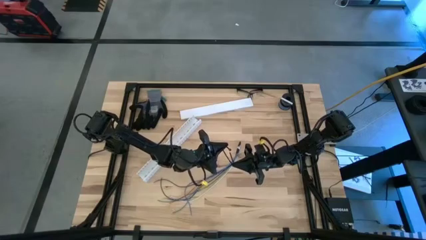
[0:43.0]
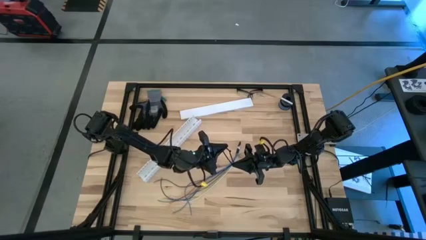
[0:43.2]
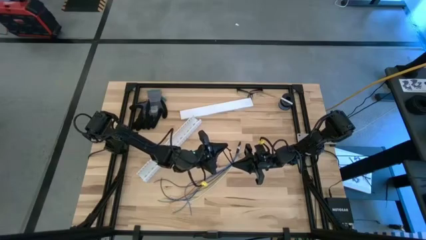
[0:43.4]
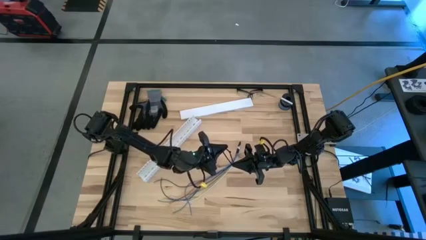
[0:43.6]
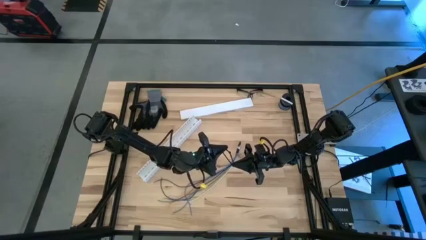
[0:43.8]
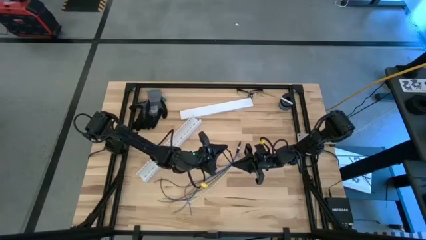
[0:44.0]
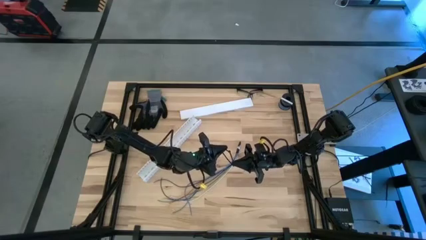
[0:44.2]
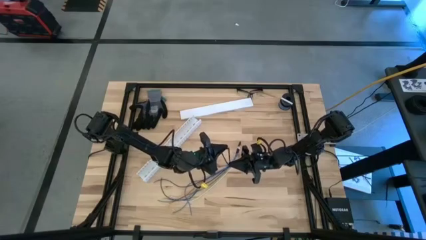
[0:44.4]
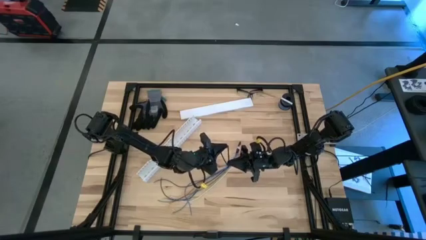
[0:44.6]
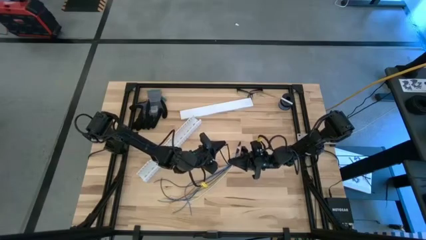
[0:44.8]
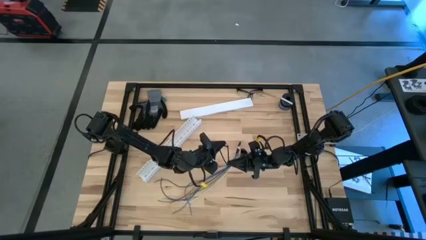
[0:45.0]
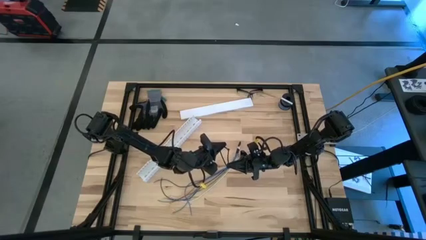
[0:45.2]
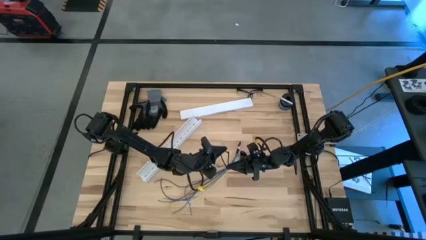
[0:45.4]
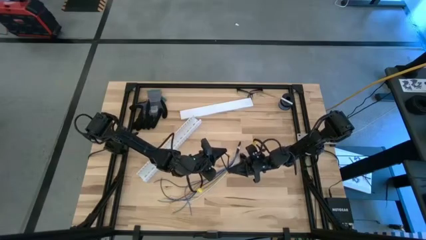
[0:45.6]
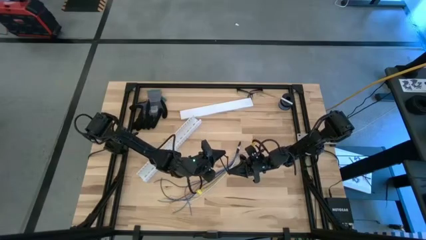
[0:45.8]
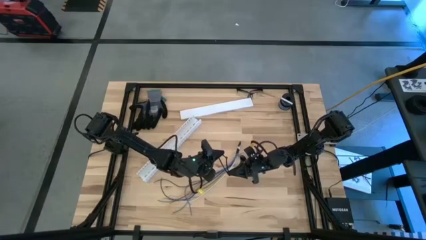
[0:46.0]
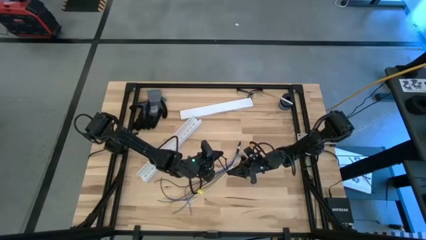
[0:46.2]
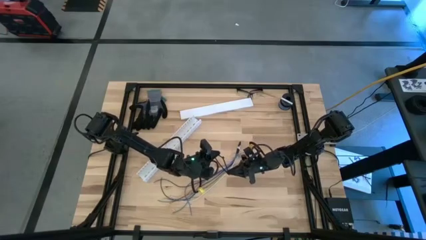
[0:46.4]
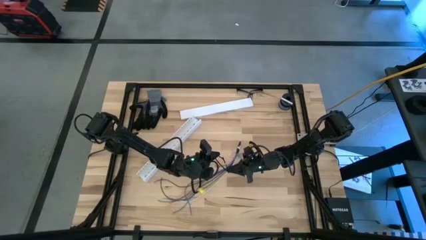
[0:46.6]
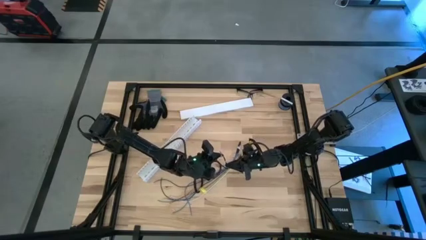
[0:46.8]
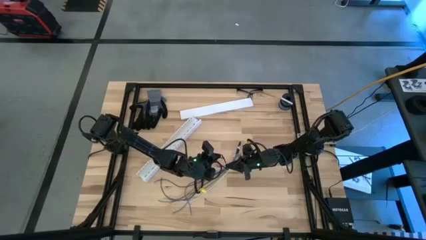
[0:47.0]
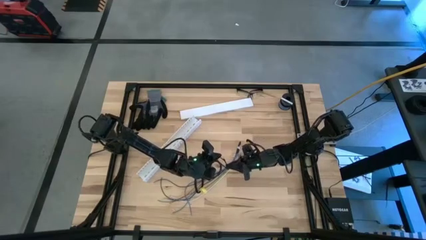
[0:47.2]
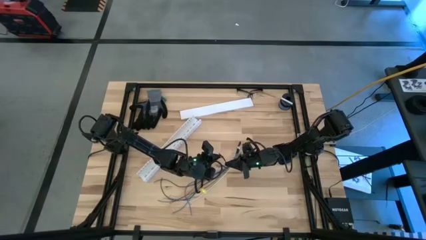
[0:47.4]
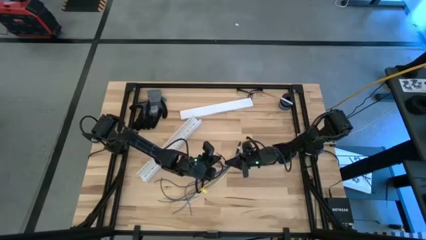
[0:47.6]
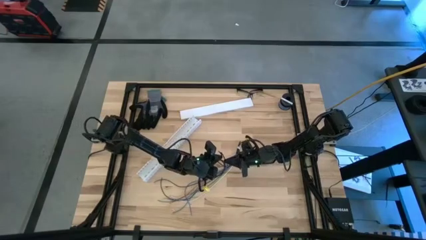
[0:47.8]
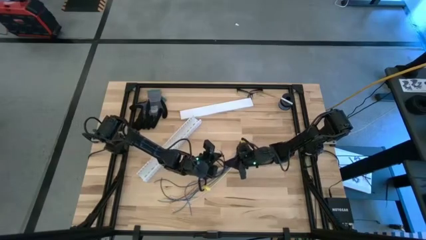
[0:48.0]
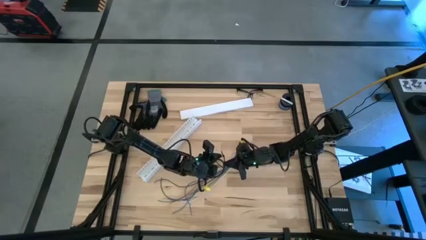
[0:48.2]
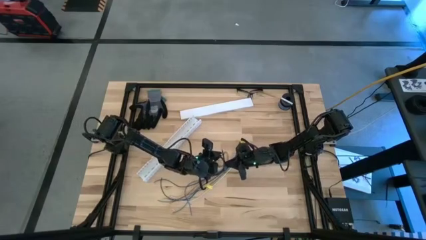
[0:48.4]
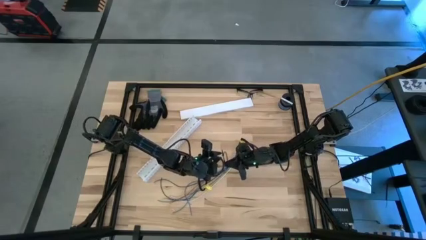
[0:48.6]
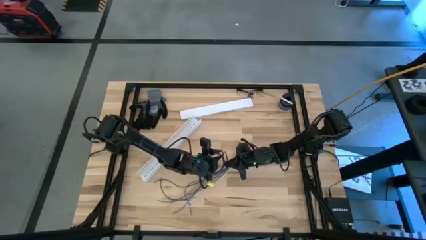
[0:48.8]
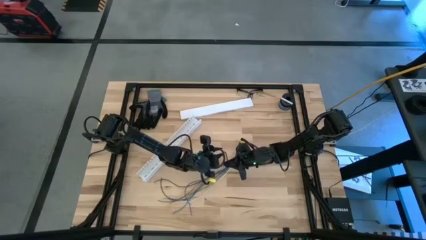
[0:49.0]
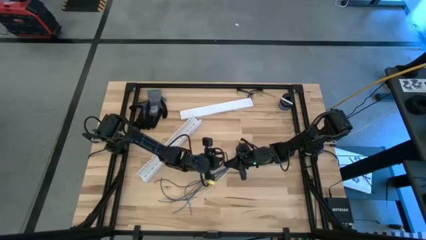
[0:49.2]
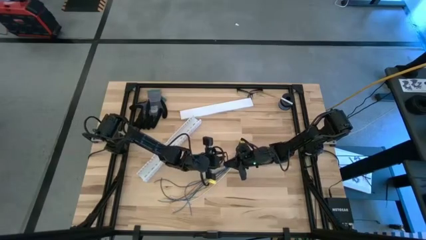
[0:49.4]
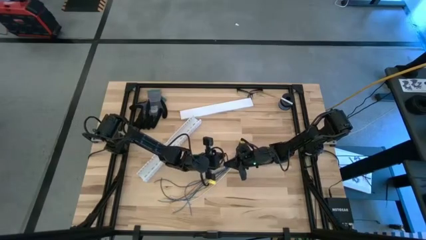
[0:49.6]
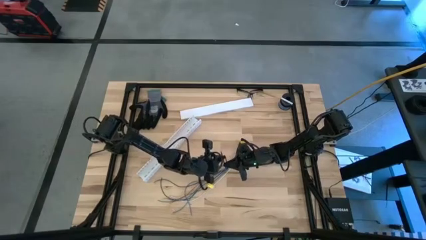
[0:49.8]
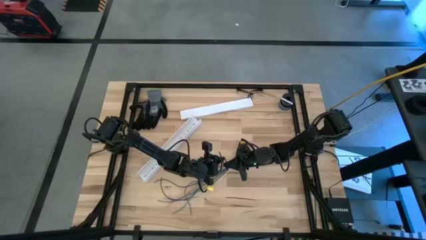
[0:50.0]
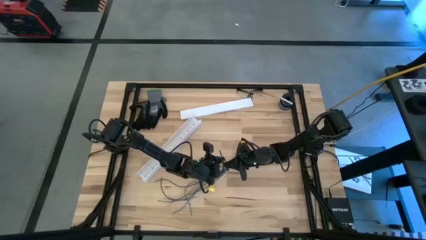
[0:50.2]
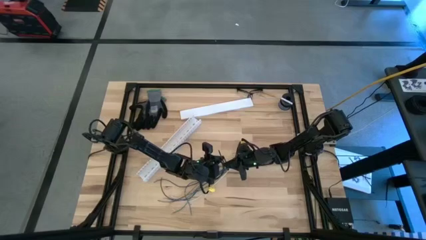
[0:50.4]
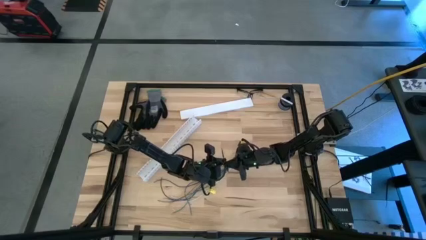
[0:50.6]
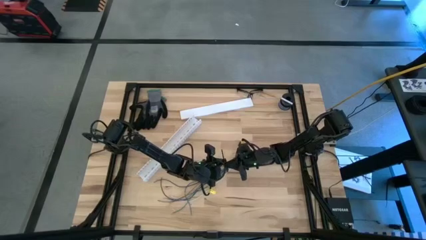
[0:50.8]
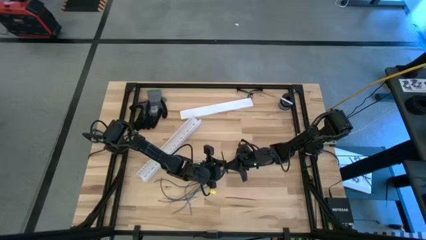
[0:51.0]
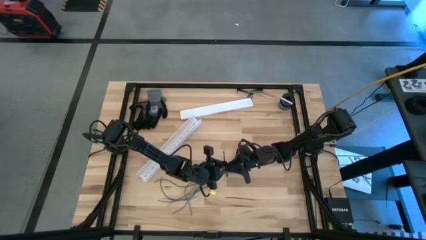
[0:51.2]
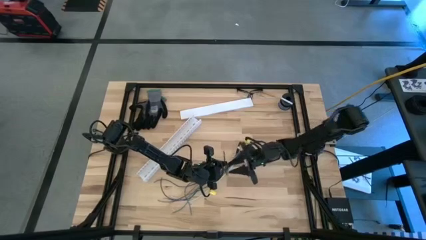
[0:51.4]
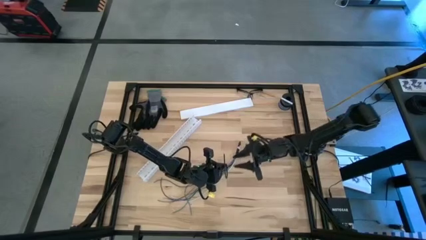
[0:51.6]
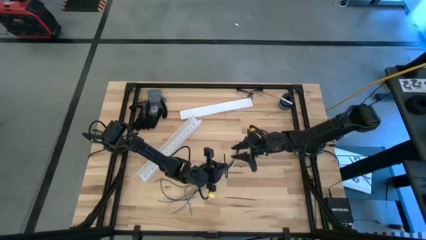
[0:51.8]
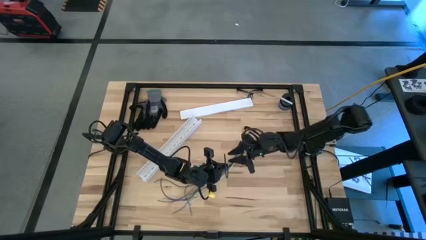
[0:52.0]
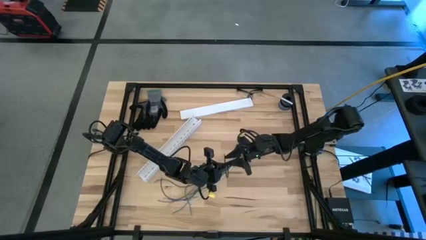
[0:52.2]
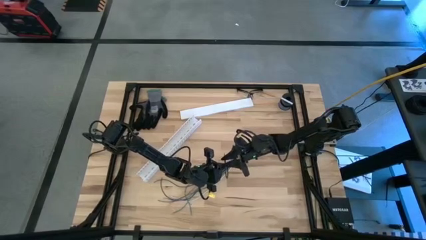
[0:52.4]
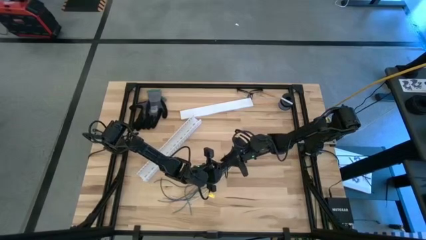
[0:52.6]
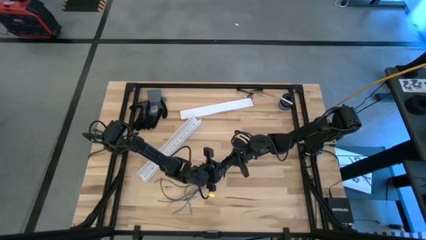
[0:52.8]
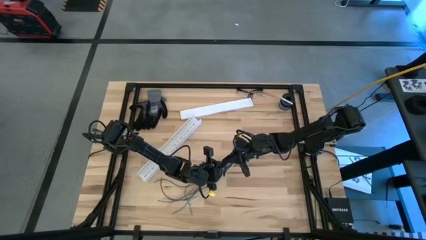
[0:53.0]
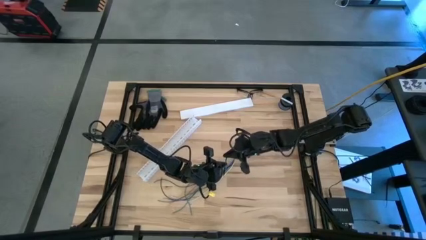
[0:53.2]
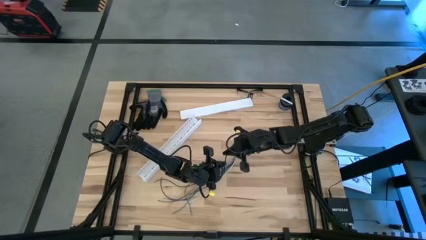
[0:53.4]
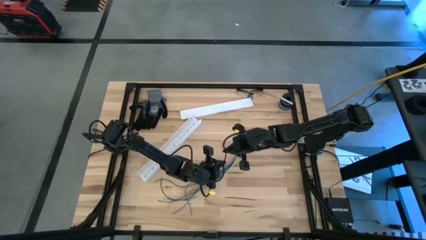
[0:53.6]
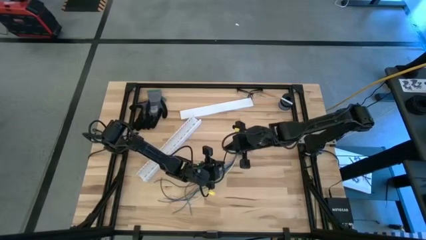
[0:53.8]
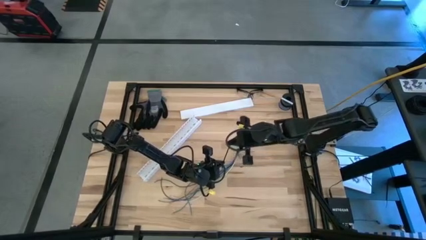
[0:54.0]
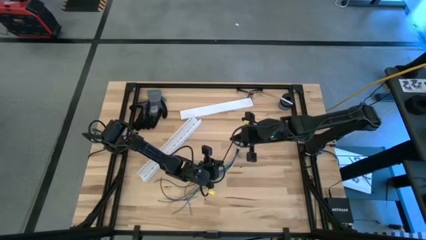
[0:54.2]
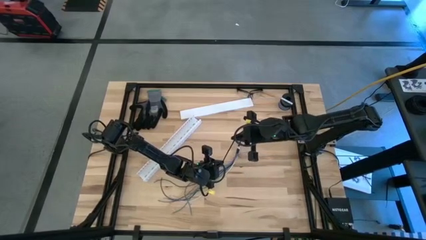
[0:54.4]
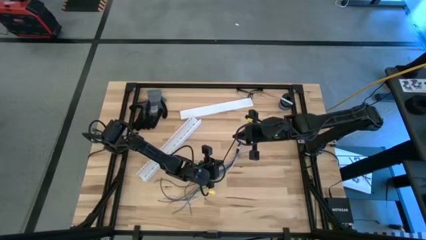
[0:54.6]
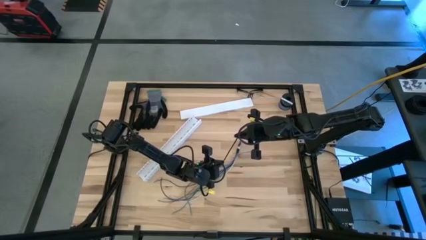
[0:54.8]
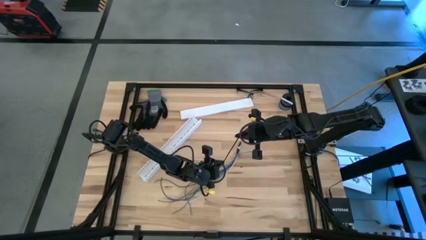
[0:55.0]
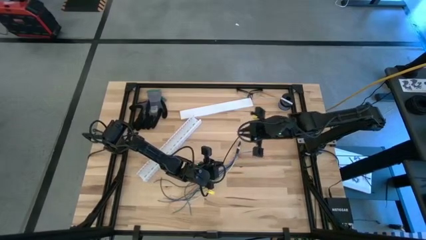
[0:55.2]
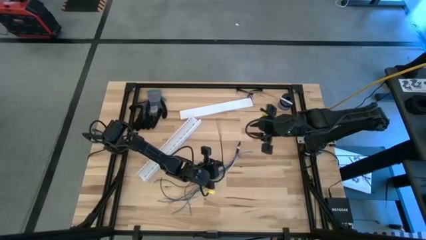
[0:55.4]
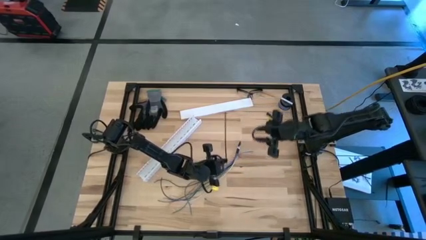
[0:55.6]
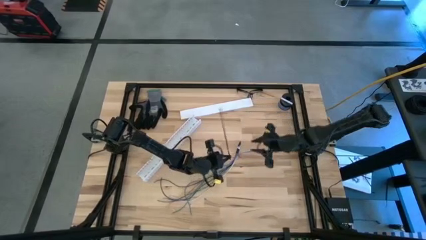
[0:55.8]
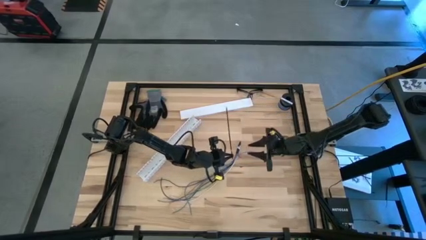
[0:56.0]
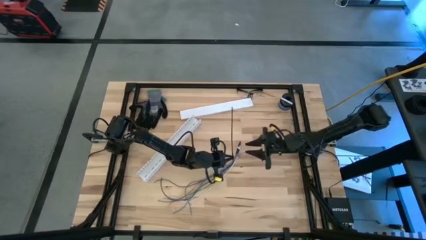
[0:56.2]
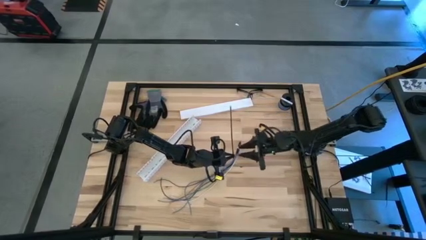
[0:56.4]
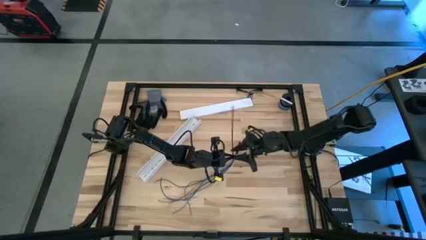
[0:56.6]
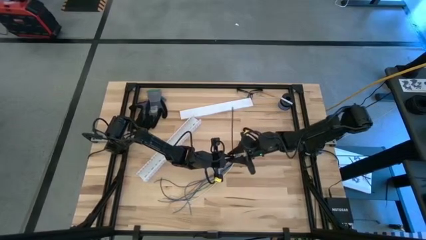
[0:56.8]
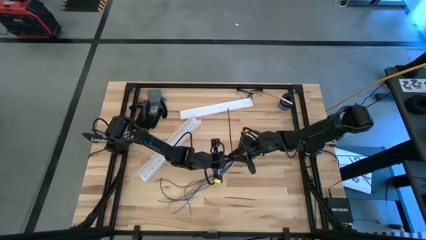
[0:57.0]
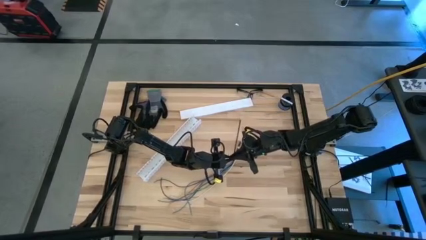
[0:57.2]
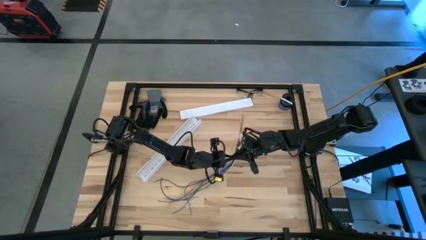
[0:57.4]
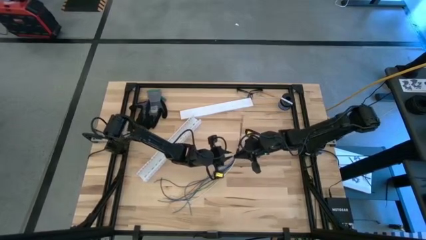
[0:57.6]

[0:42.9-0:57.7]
Task: Ziptie cables
Wrap the zip tie on the cables

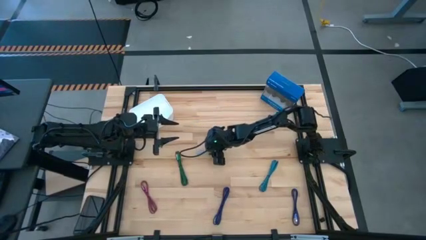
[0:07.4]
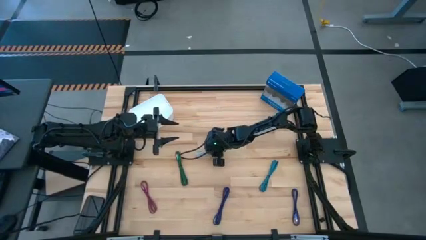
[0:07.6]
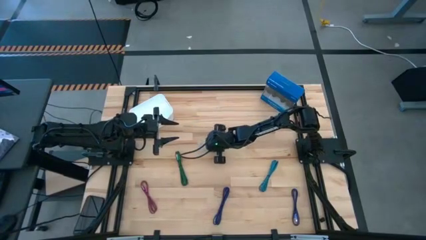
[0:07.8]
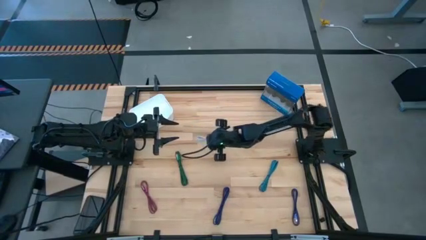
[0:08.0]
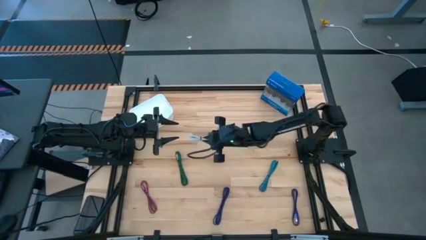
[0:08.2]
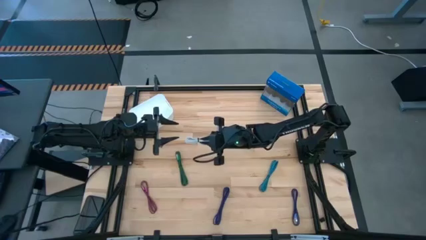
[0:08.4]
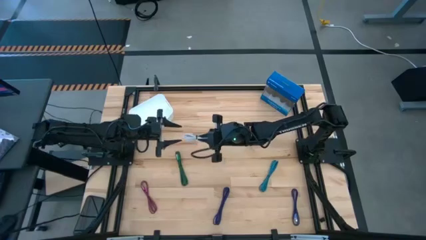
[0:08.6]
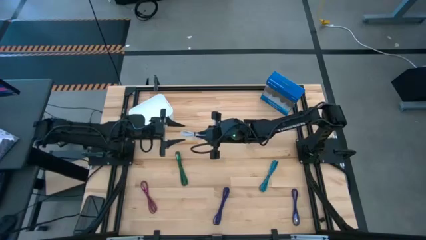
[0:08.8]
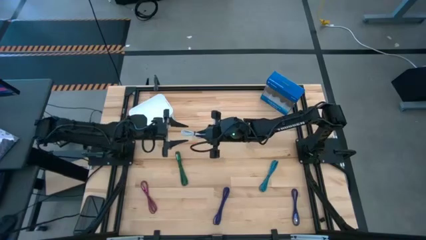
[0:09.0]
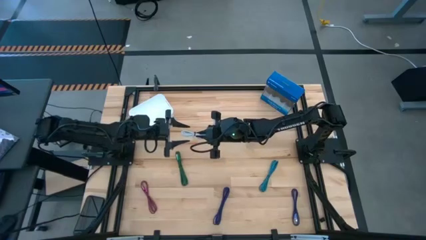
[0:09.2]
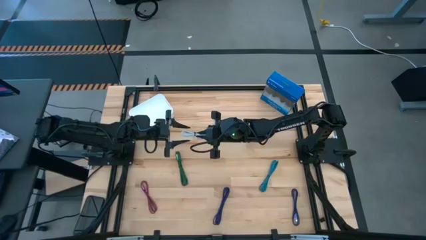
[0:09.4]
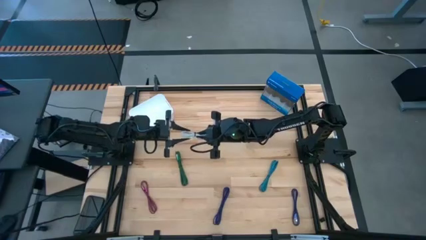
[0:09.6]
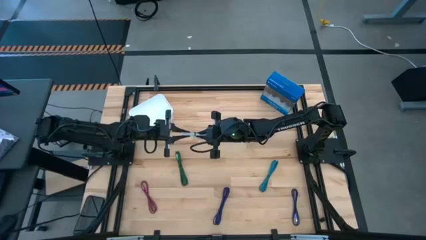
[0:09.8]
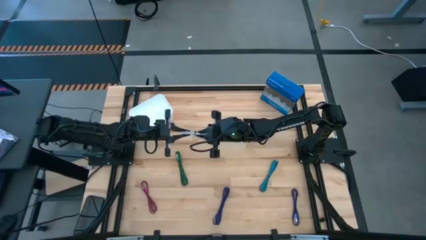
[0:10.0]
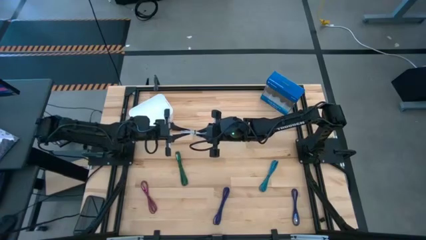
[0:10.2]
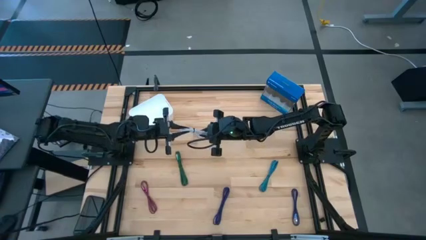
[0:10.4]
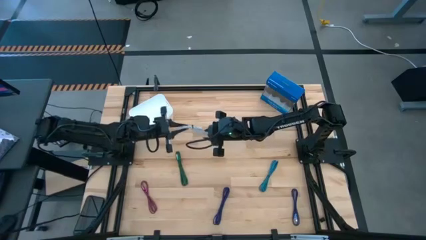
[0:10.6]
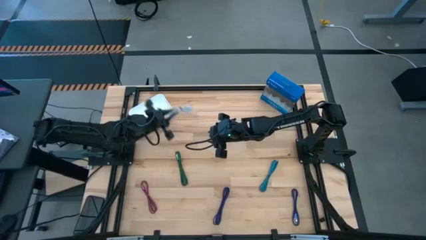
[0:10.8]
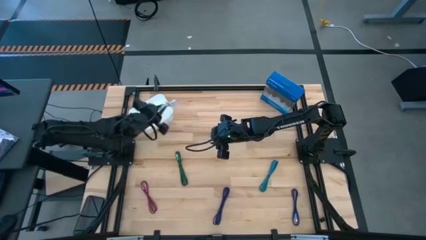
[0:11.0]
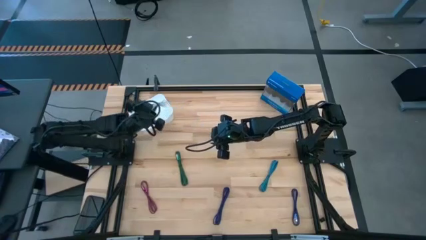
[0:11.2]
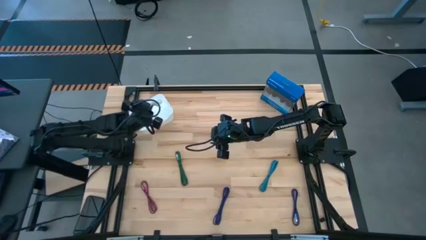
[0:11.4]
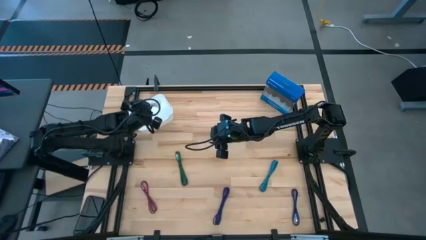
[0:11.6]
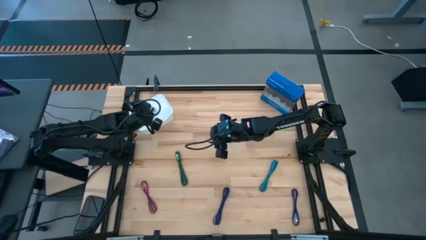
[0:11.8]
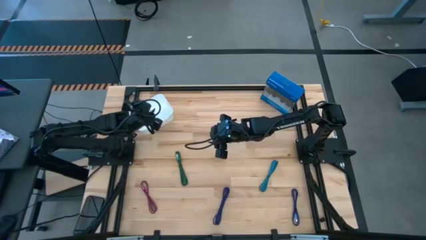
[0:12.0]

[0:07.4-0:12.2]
Task: Pick and place USB-C Cables
Put the white charger cable into the white bin
